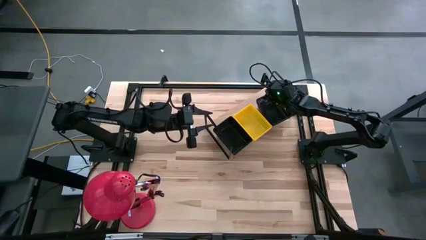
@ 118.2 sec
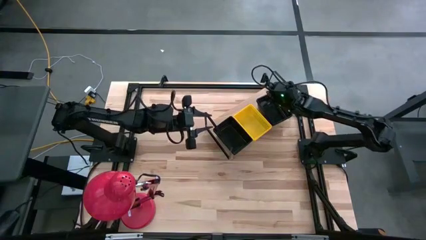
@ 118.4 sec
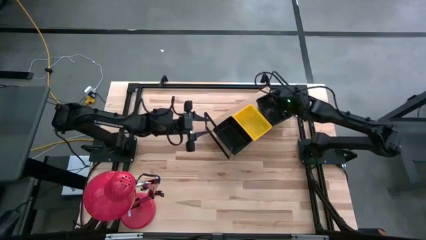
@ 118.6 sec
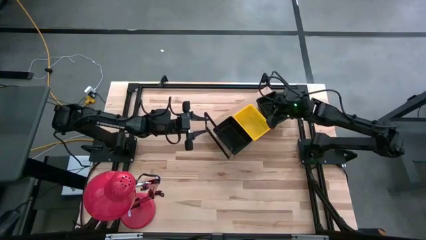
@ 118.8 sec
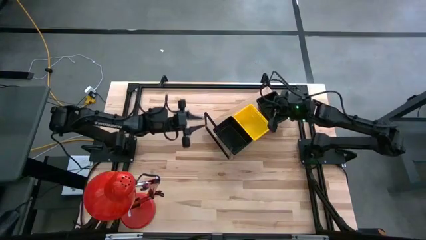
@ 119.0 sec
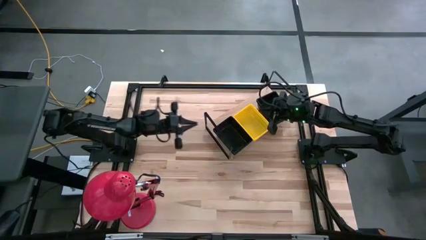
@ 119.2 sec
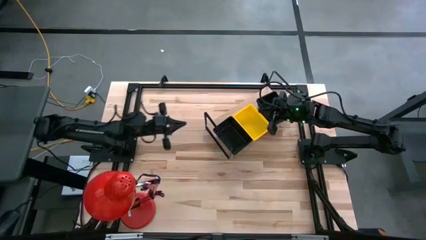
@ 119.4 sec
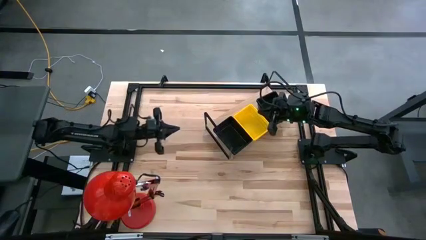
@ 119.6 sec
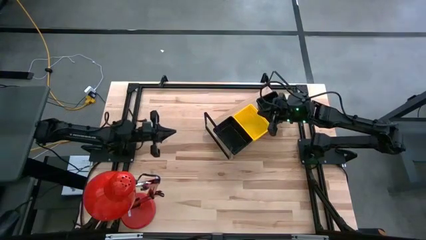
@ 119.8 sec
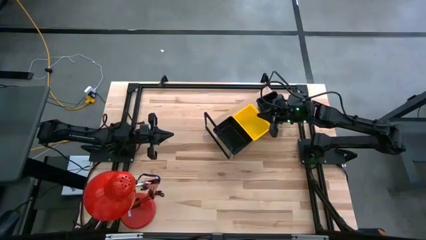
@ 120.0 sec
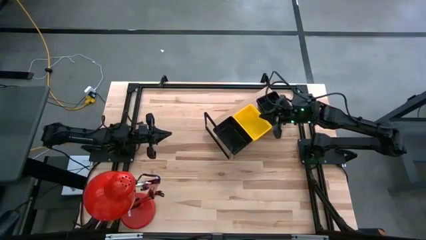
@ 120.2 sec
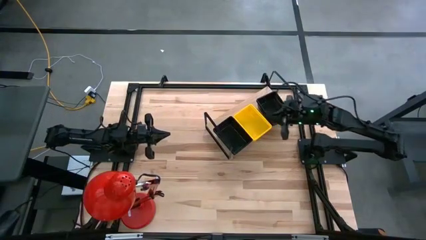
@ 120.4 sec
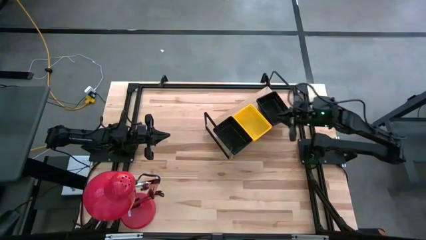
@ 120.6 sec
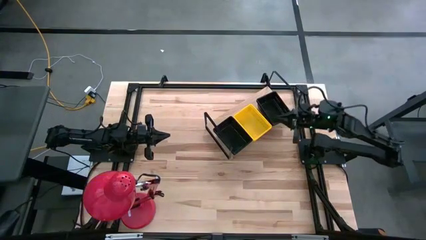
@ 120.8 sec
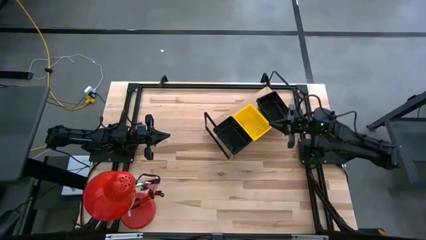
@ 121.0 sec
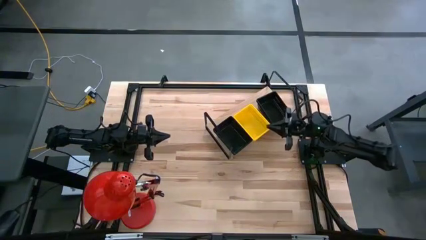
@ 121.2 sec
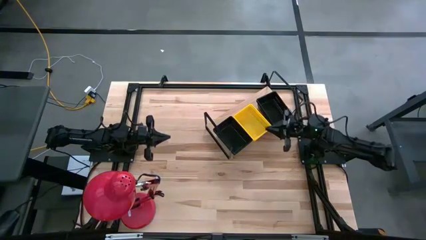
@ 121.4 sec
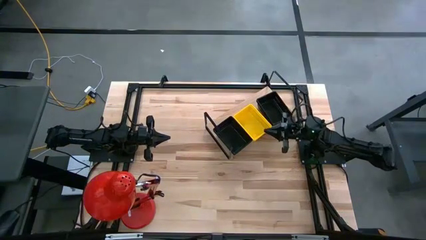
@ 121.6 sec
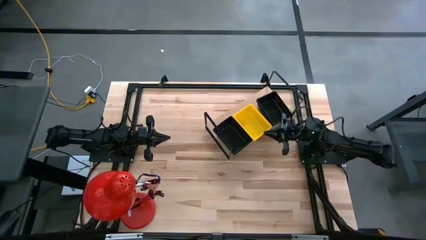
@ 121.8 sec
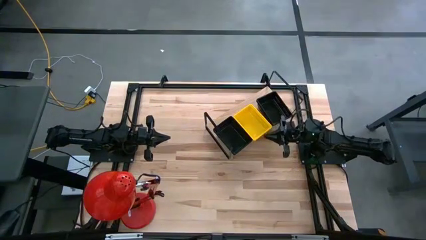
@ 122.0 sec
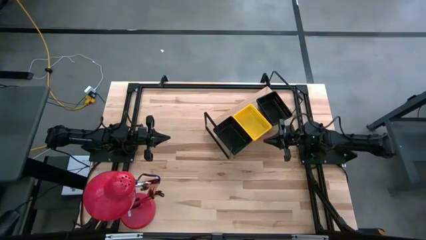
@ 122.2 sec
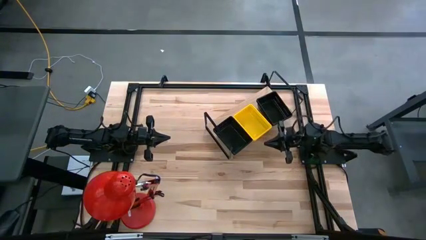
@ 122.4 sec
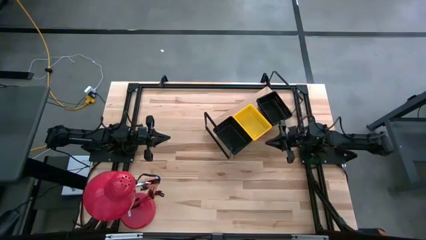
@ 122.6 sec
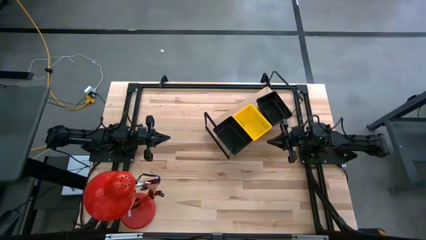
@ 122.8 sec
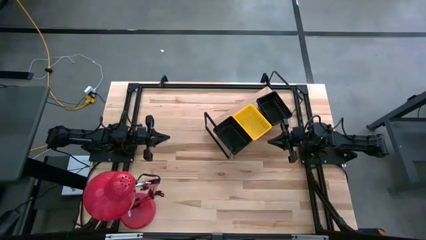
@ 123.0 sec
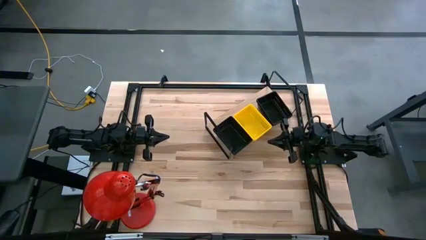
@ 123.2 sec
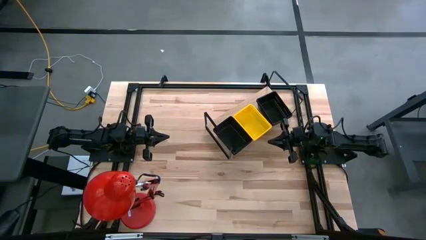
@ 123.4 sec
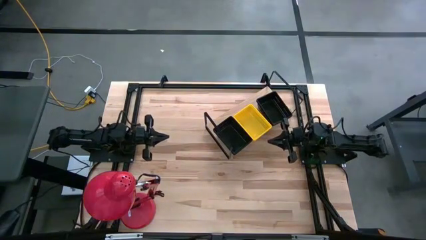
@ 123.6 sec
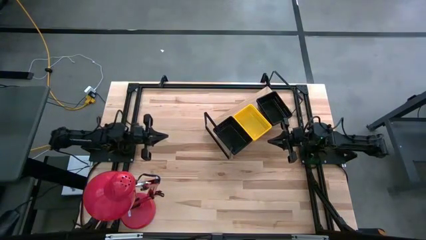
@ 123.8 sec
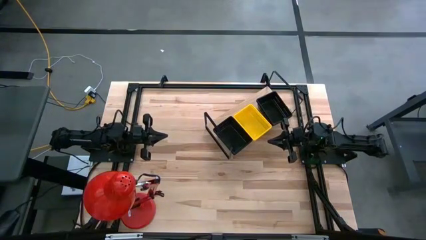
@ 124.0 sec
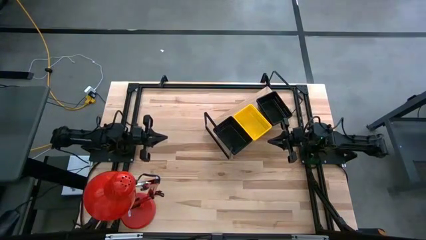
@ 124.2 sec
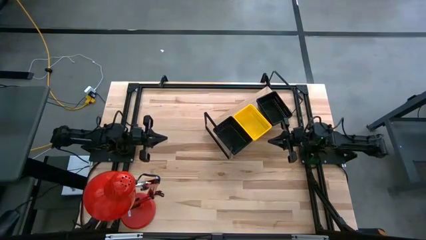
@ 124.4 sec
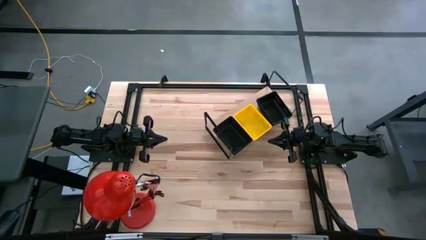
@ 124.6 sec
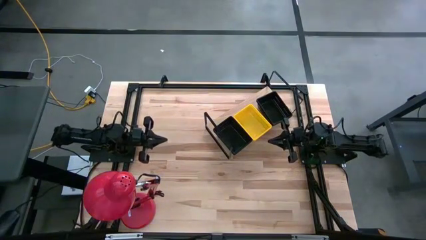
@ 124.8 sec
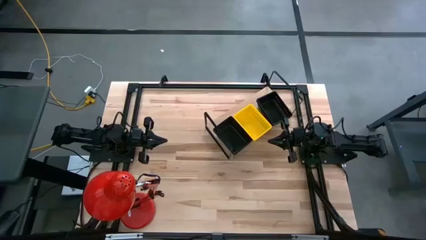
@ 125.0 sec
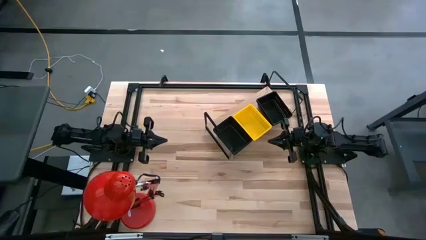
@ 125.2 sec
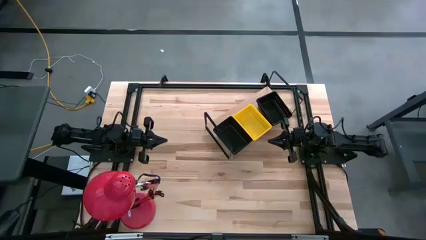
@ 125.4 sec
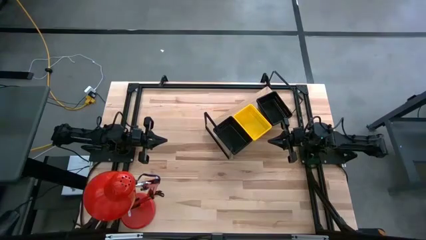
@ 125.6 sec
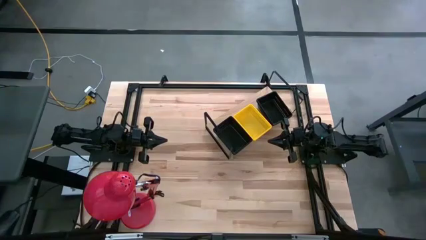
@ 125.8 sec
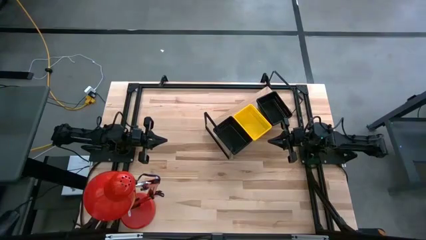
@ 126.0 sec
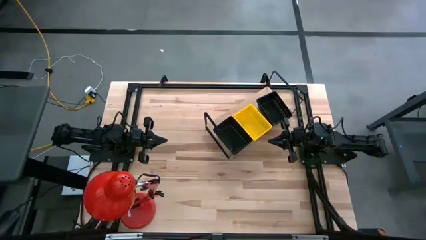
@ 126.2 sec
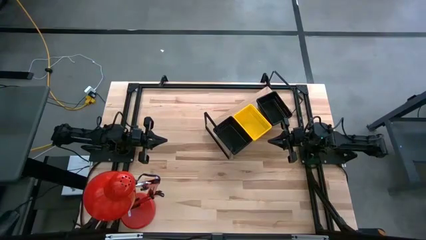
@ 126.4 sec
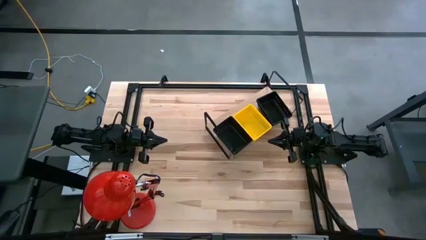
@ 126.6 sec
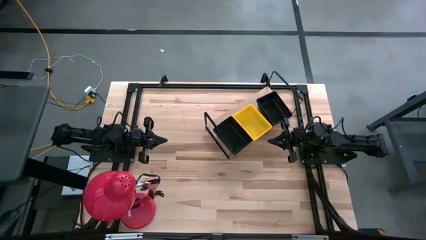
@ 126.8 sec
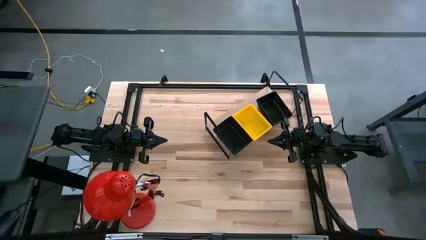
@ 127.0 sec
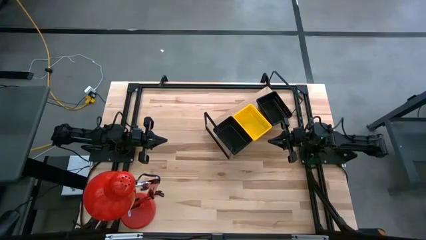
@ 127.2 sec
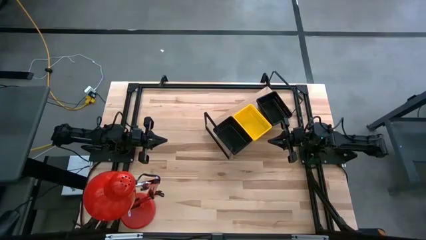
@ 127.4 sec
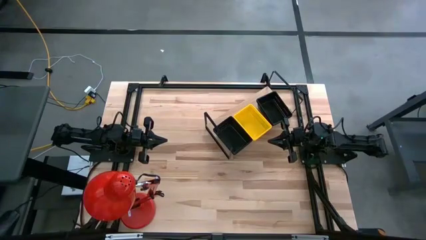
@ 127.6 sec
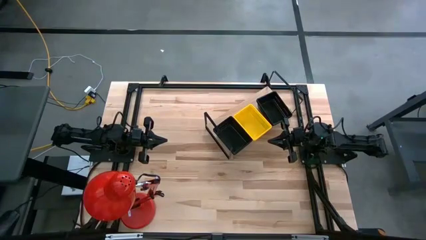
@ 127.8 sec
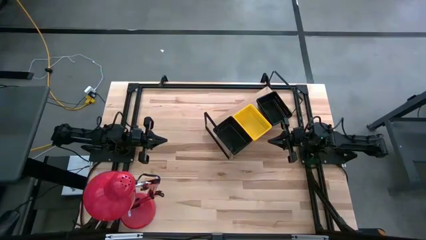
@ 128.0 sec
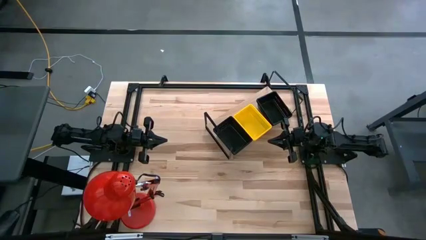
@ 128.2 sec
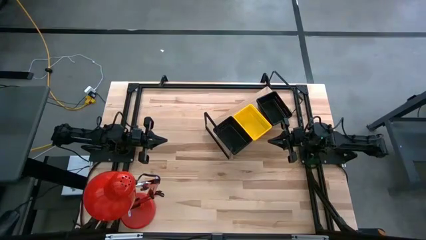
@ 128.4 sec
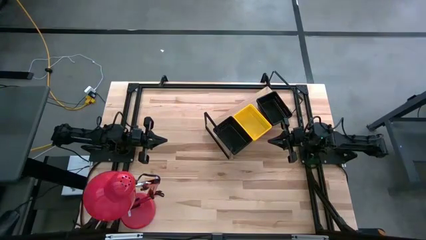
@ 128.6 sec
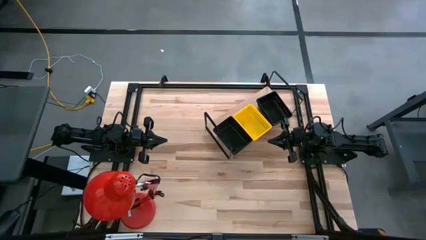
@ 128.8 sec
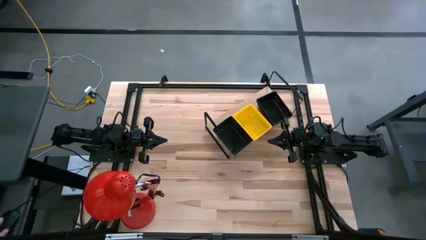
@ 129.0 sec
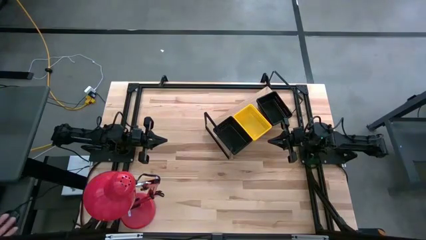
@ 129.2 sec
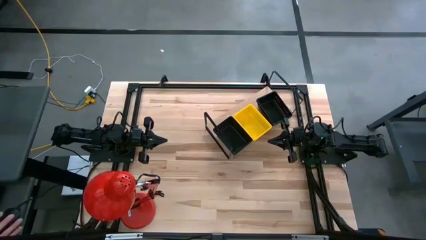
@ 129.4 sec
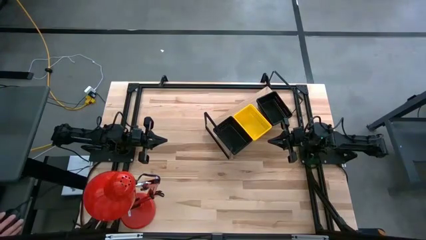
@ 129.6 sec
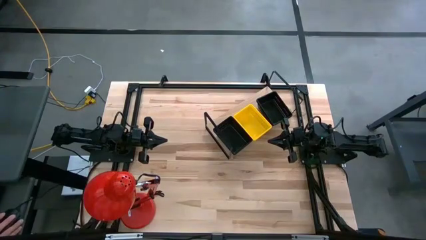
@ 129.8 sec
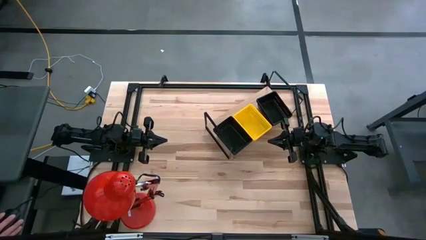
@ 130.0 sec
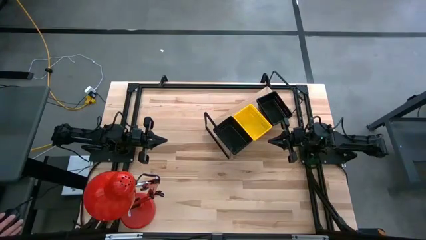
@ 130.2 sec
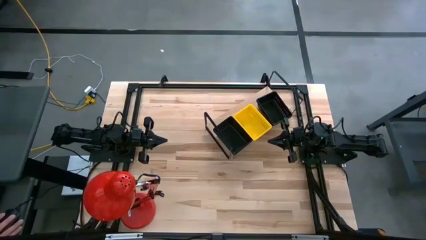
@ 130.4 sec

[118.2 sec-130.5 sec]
Task: Stack baskets on shelf by color
Return to Home Position
